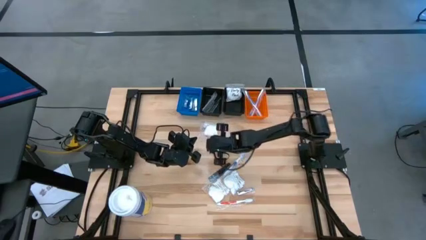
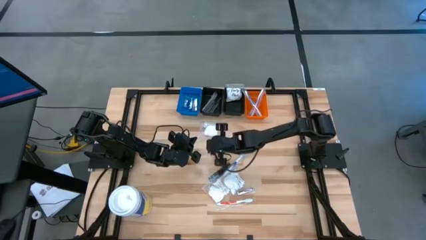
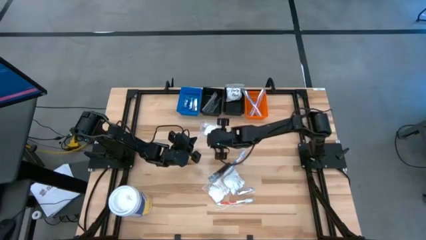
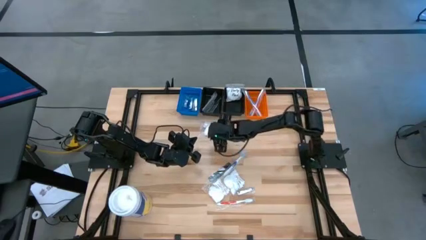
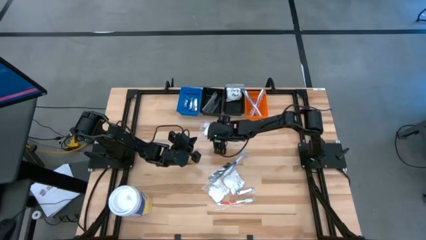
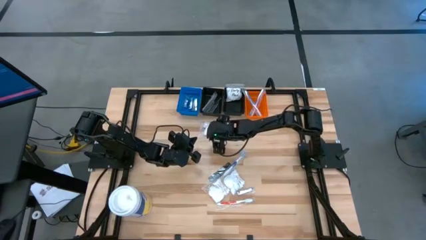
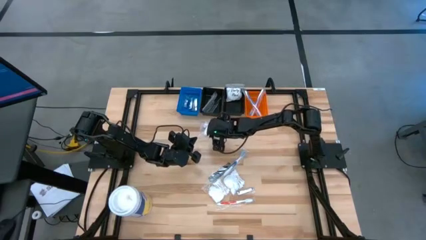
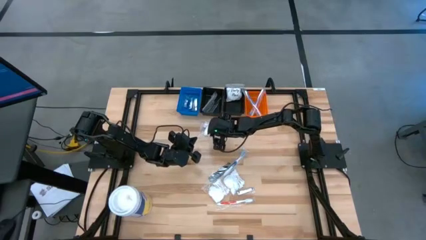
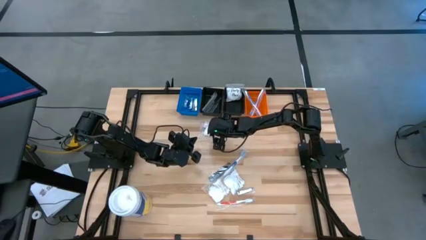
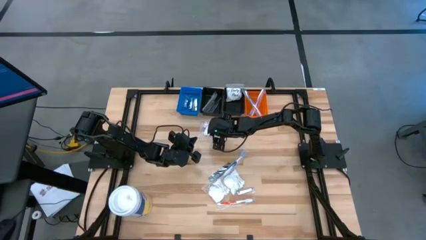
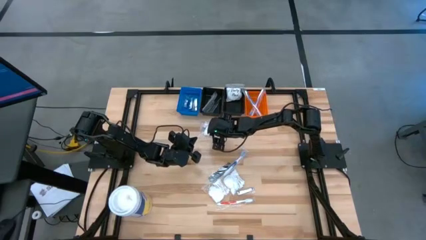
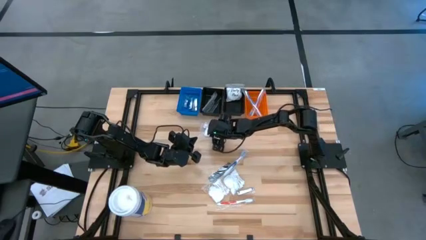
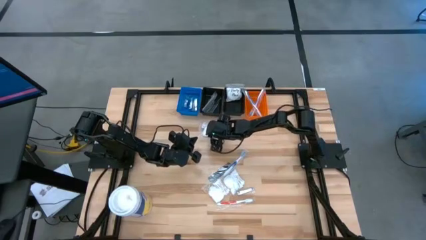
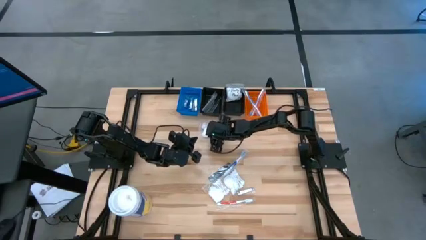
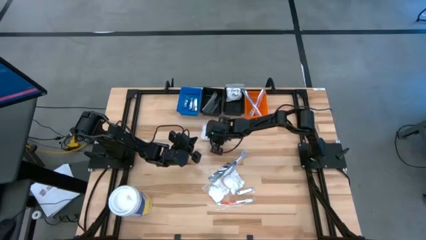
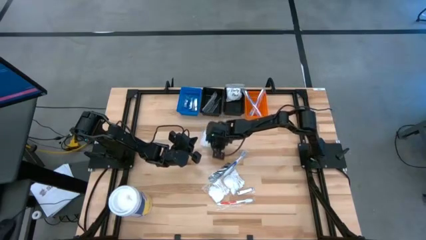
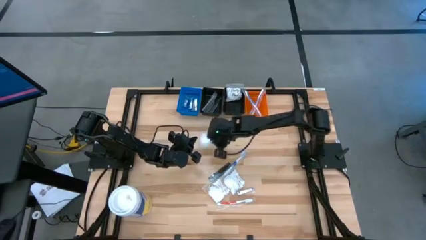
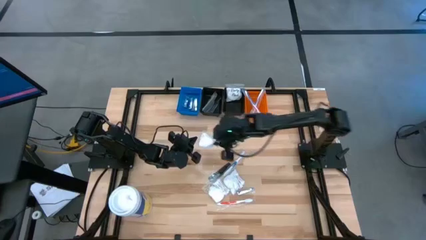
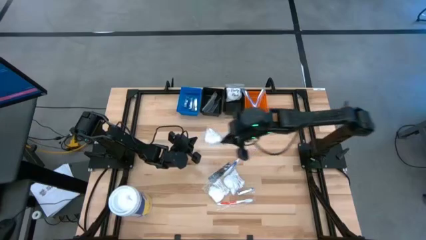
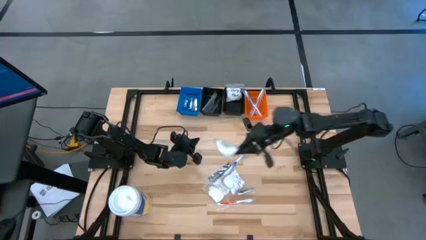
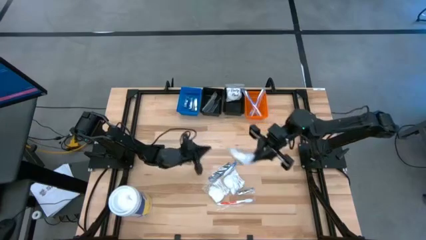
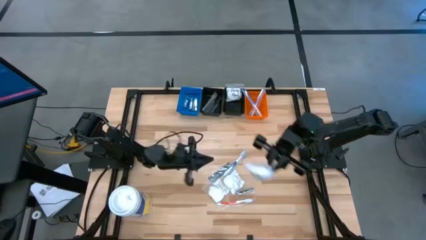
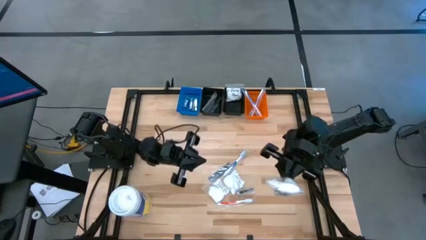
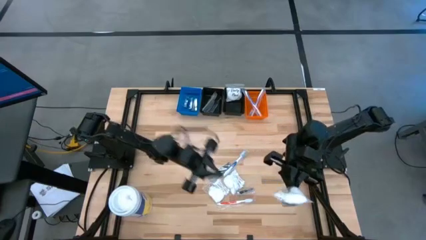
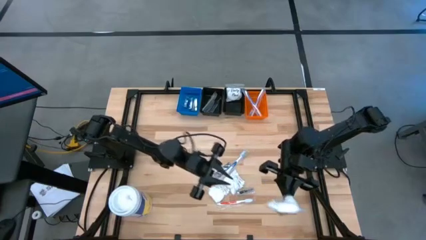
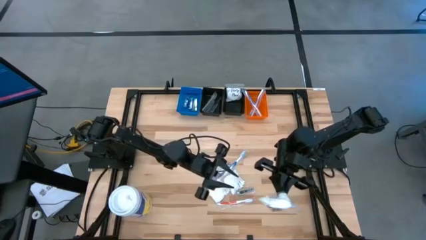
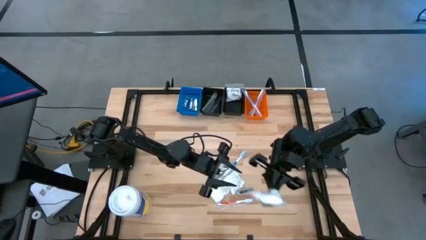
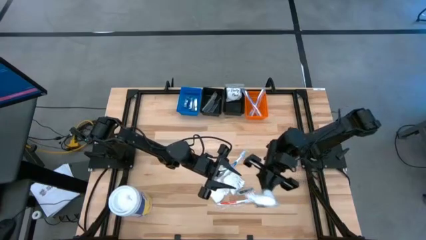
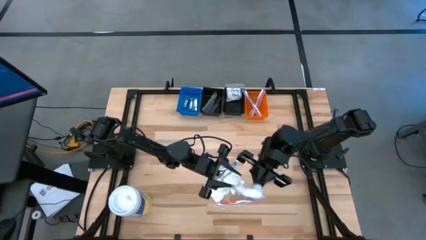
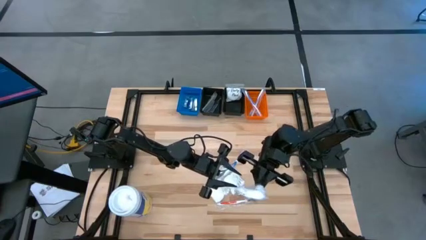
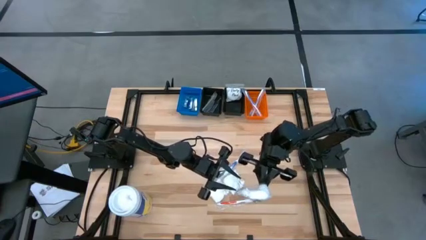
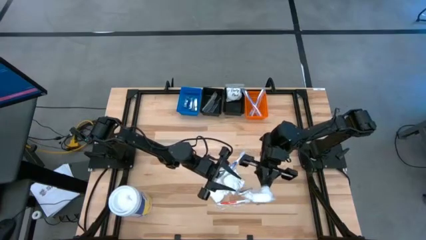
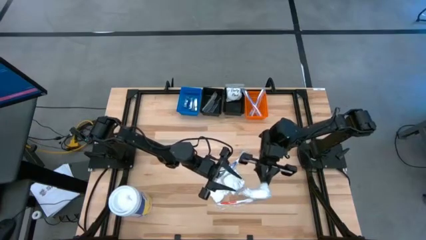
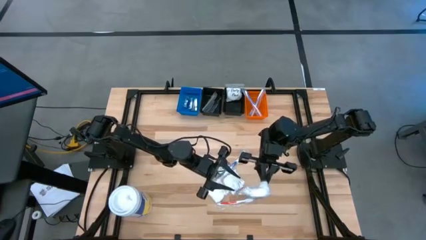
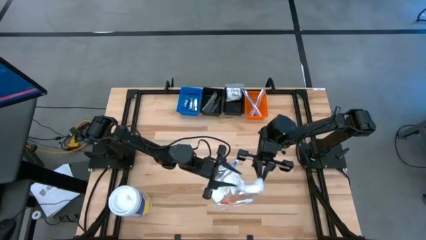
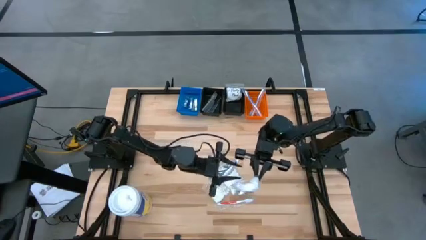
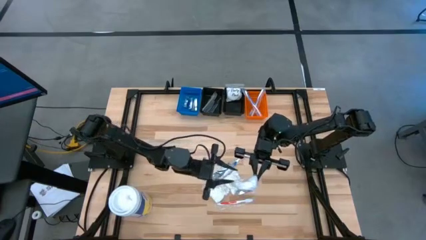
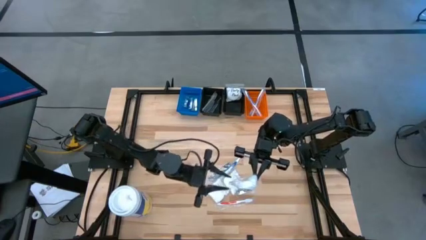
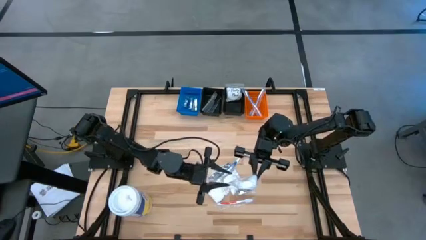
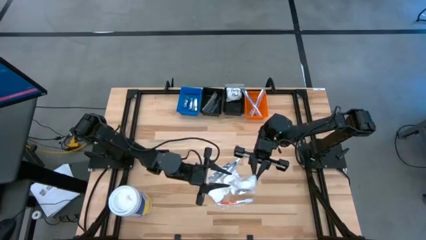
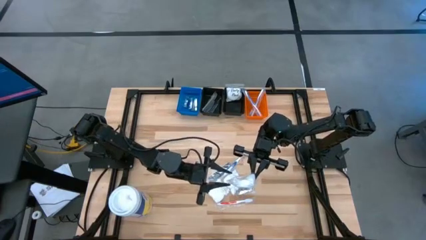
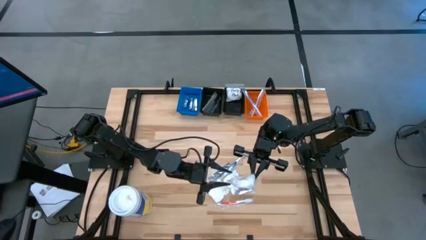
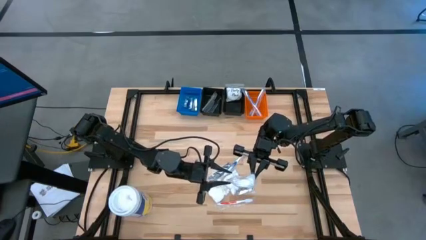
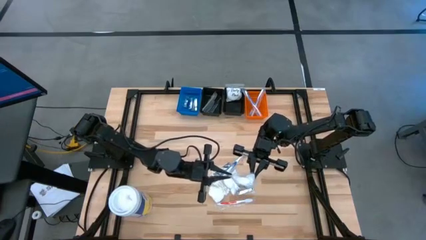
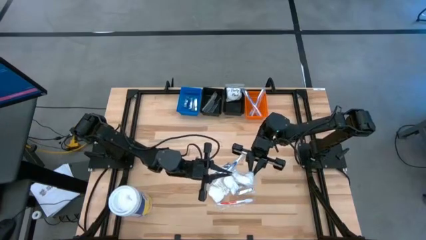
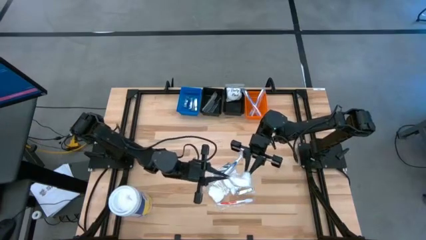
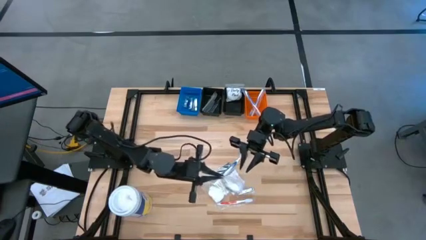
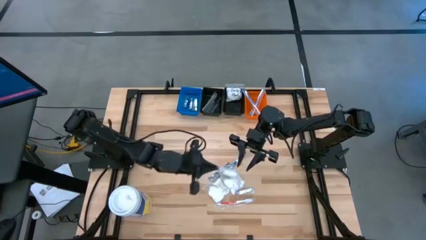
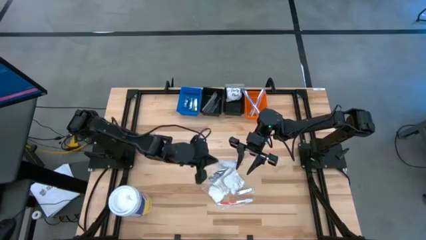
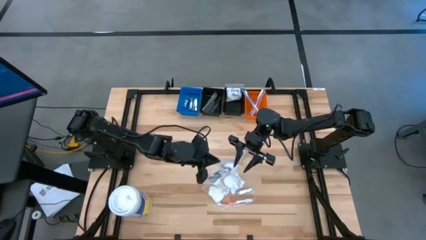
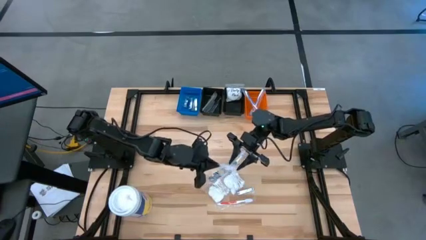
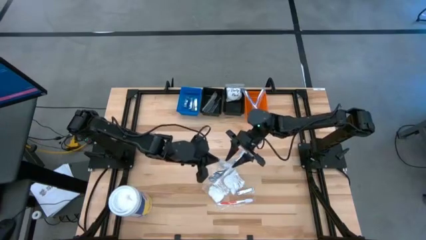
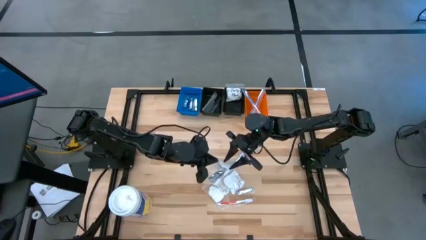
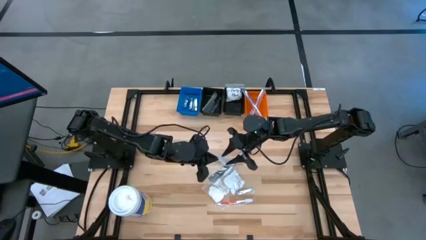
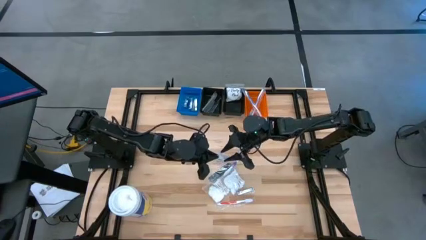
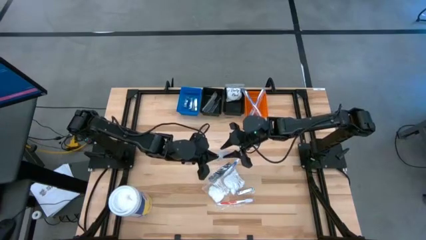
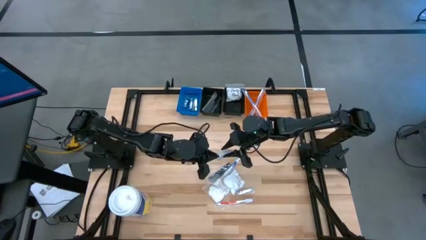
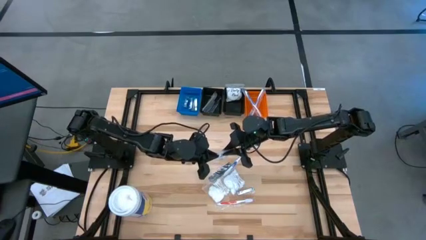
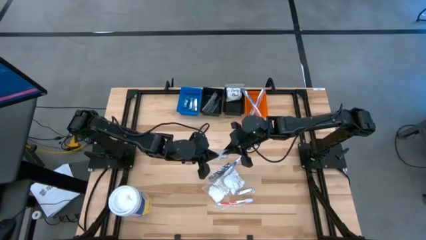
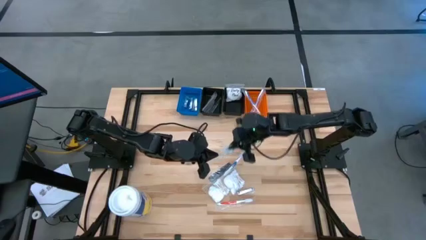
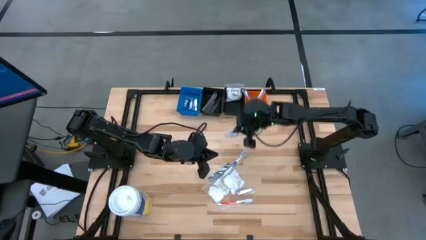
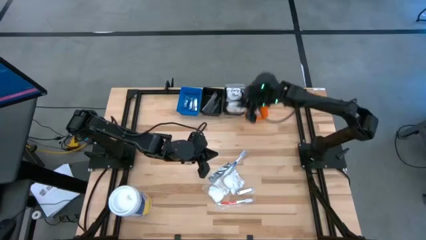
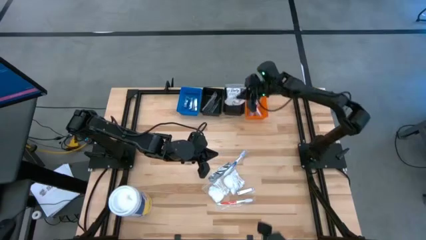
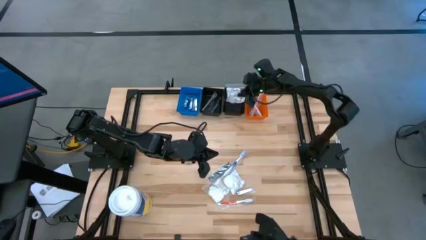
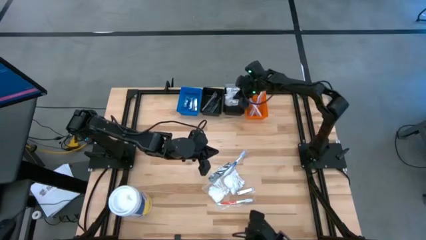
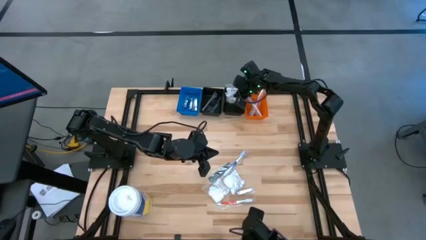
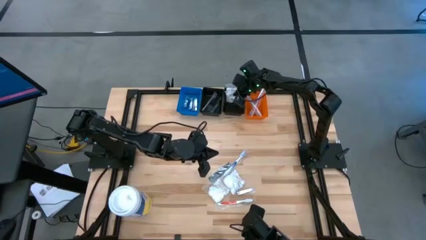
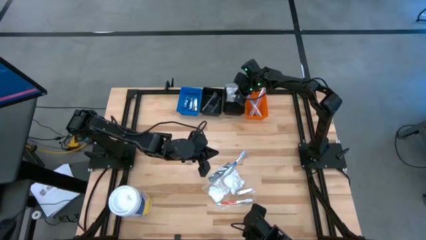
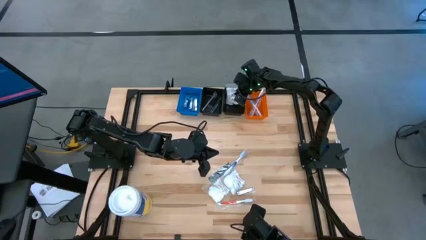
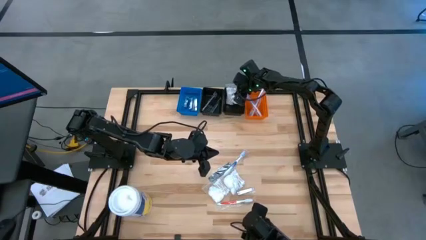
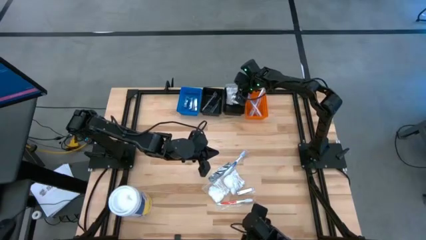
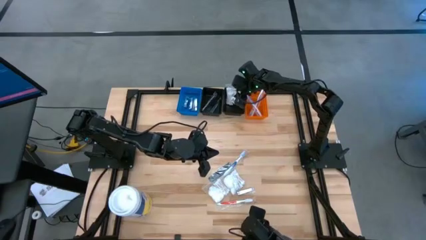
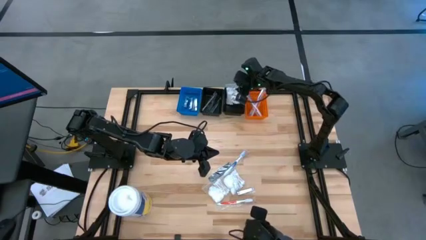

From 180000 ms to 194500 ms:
Task: Pick & Place Travel size toiletries
Put the white vanity pack into the right black bin

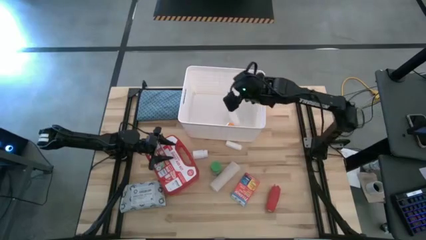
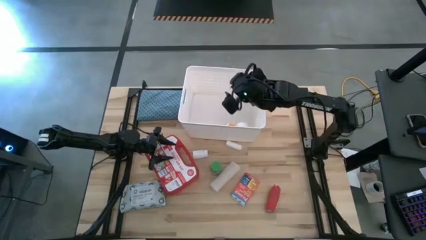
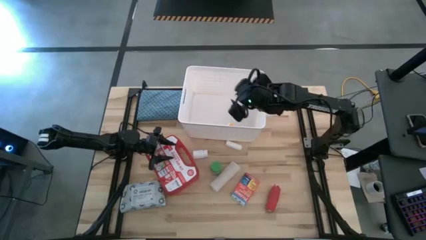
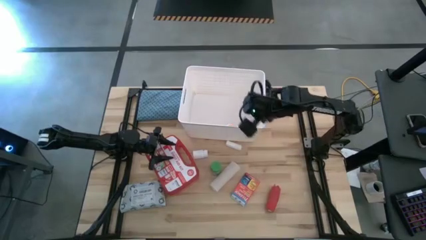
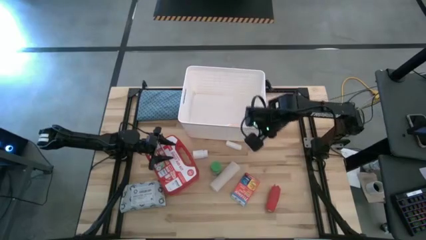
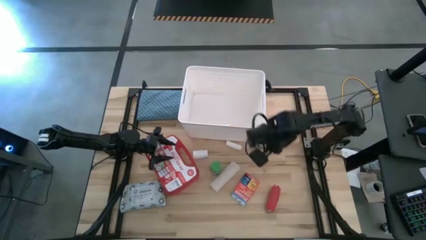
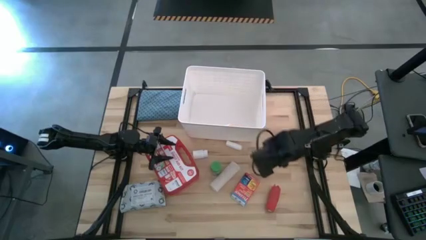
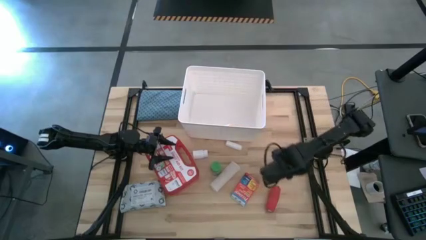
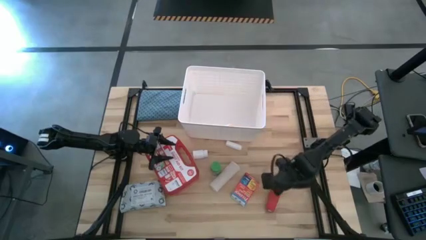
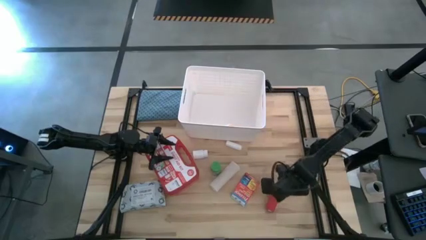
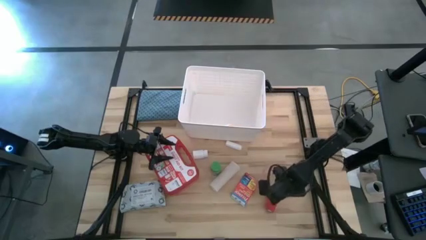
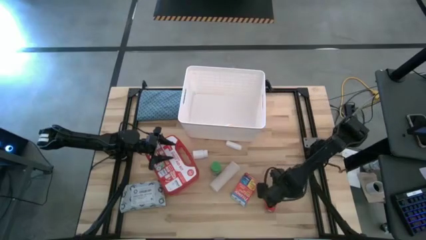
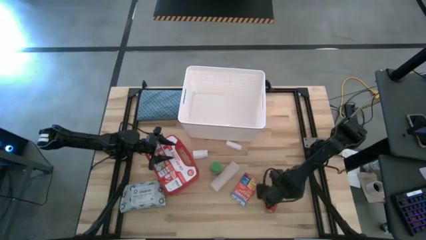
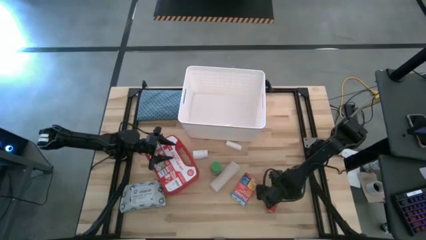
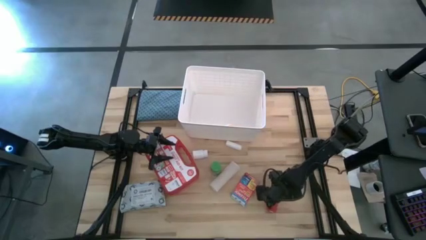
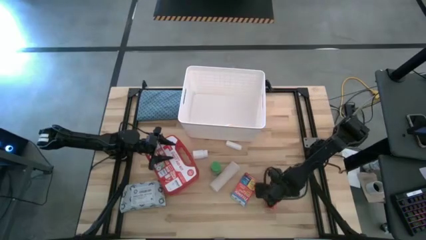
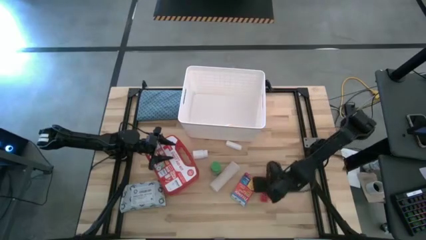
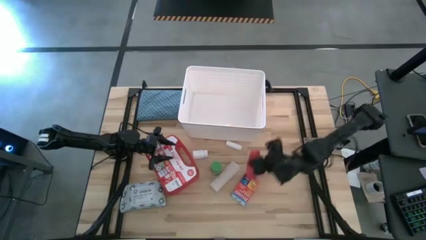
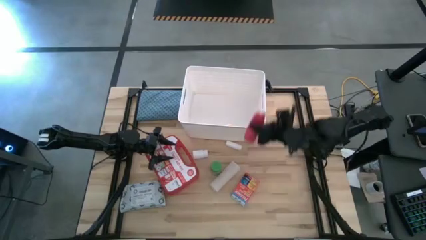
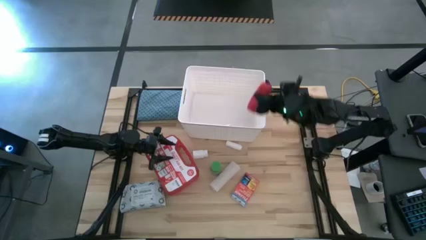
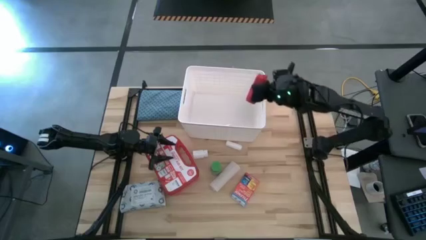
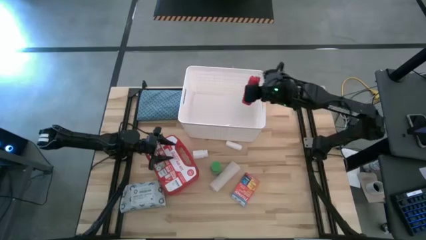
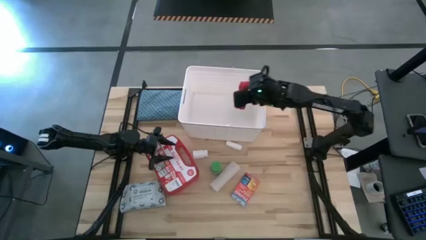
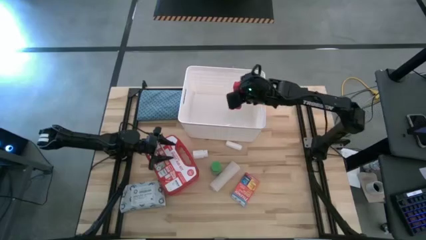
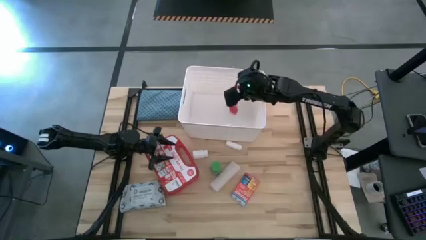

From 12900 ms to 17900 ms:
Task: Pick & place medical supplies in basket/bin
Put the red bandage in the white bin
